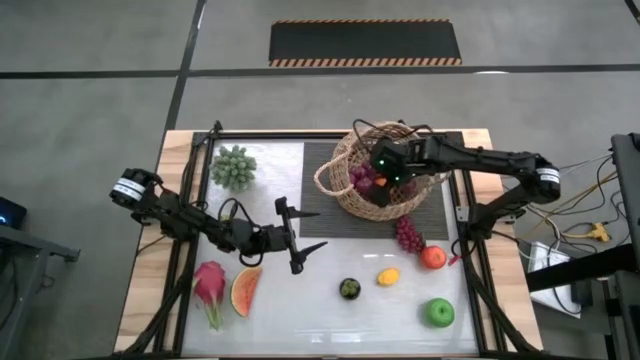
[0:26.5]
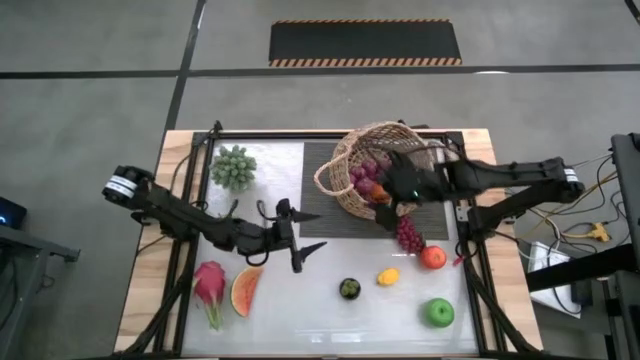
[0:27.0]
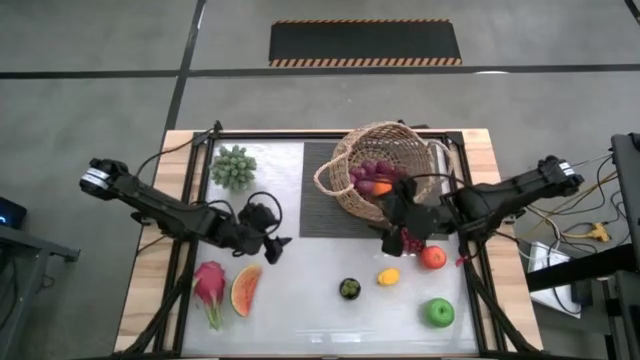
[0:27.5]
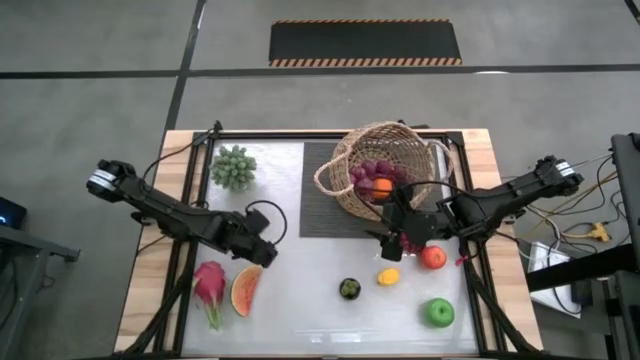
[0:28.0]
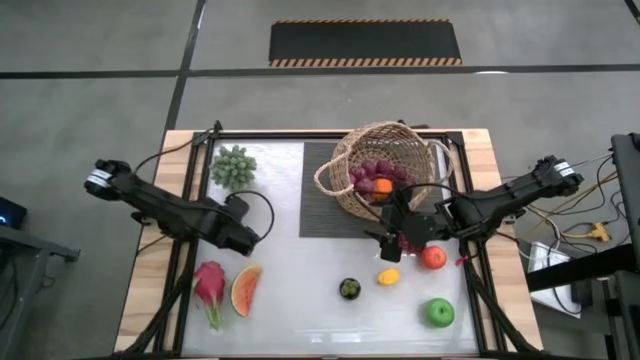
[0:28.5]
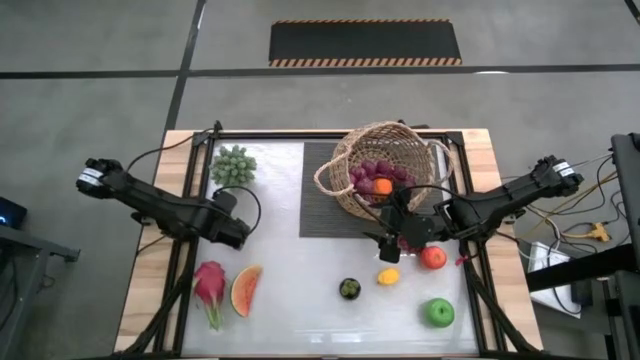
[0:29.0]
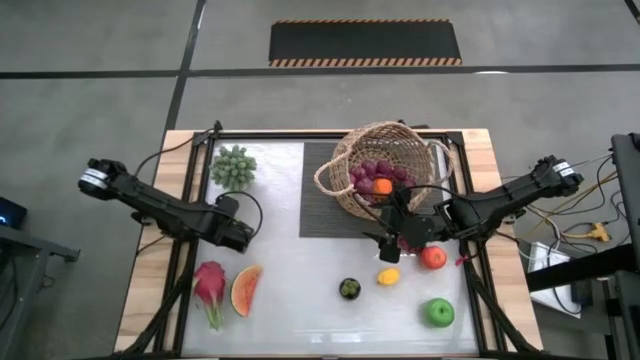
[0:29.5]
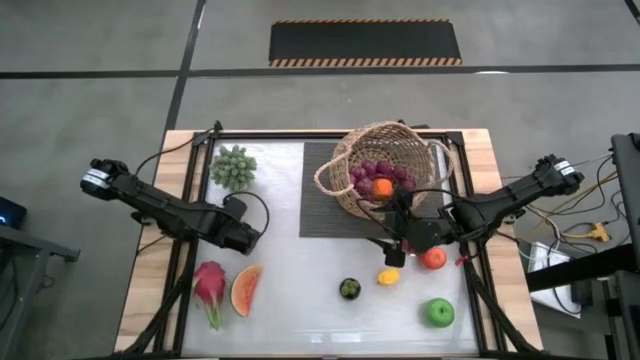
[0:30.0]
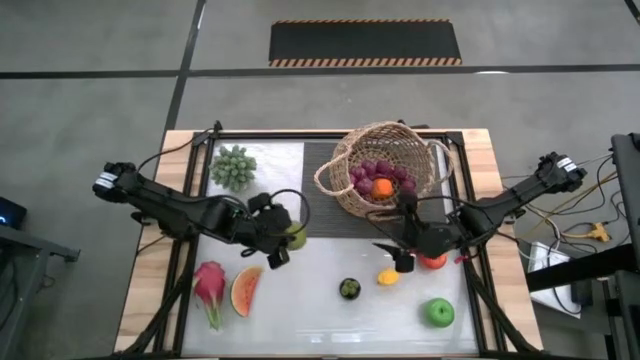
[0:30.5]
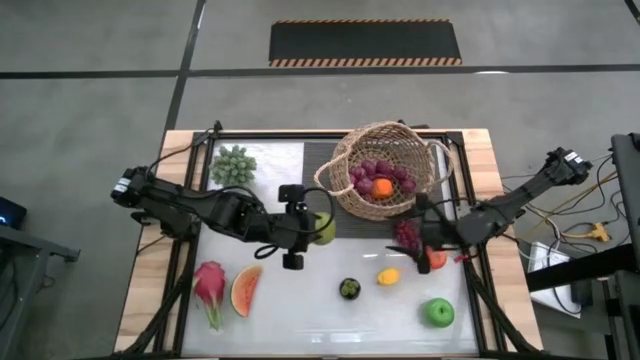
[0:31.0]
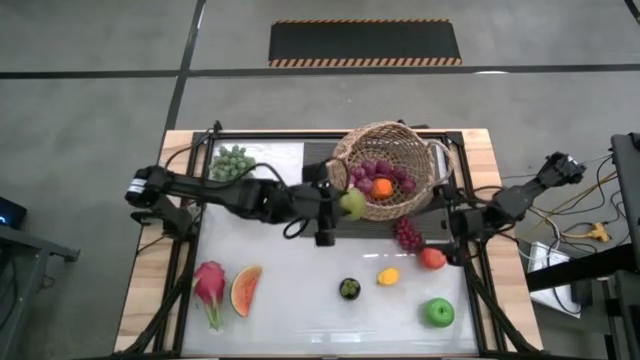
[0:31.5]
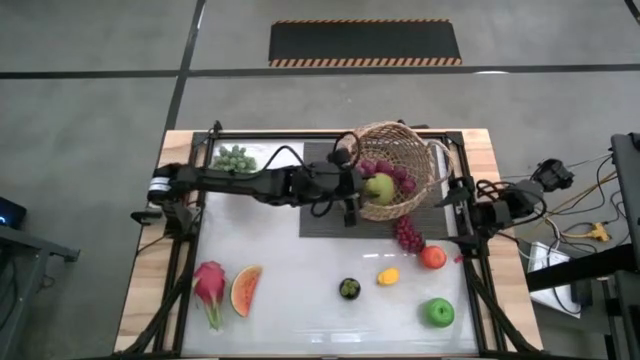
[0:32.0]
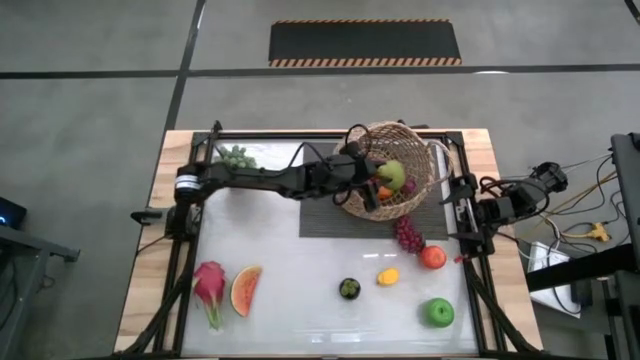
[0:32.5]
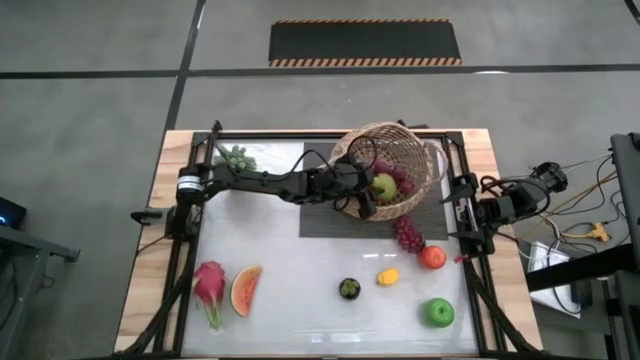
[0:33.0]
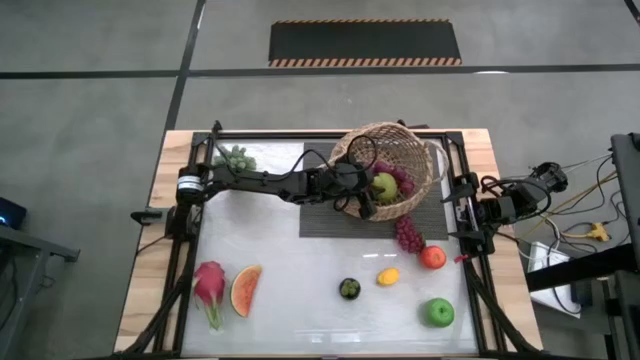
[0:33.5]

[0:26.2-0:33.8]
Task: Build produce basket
Put the pear into the brown basket

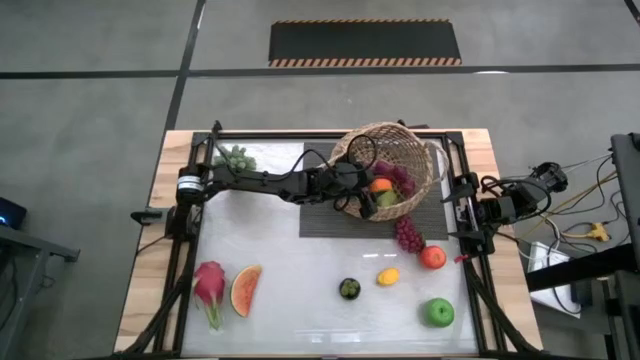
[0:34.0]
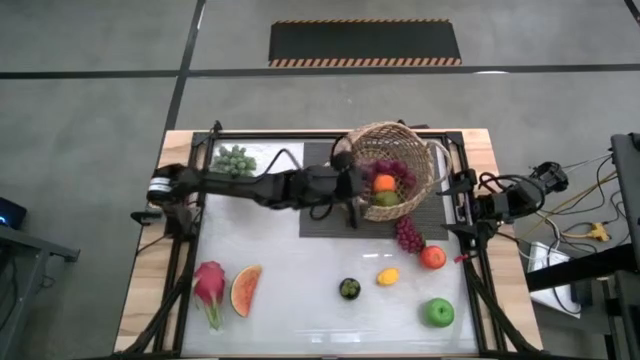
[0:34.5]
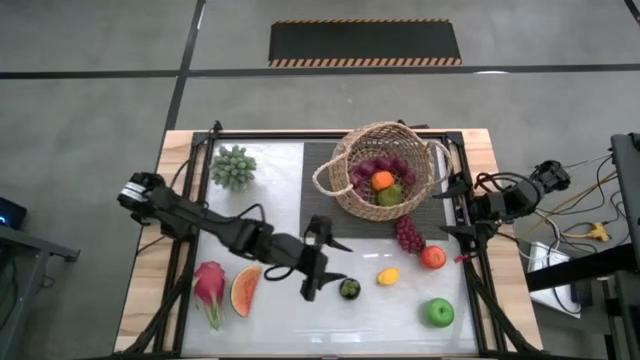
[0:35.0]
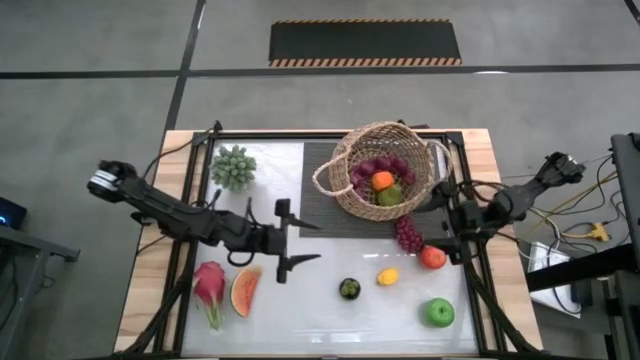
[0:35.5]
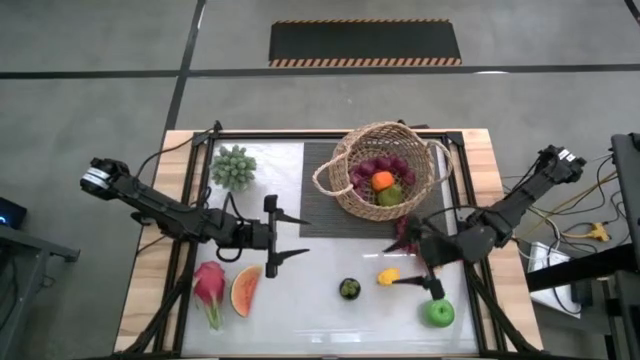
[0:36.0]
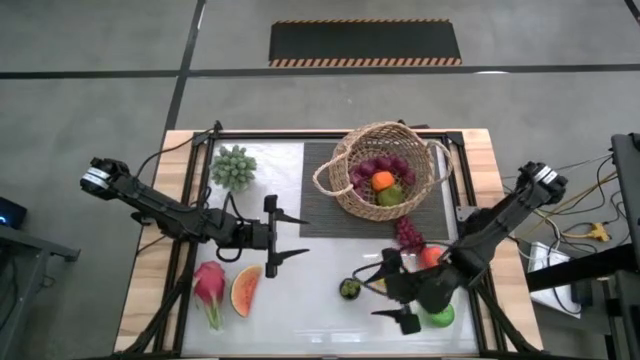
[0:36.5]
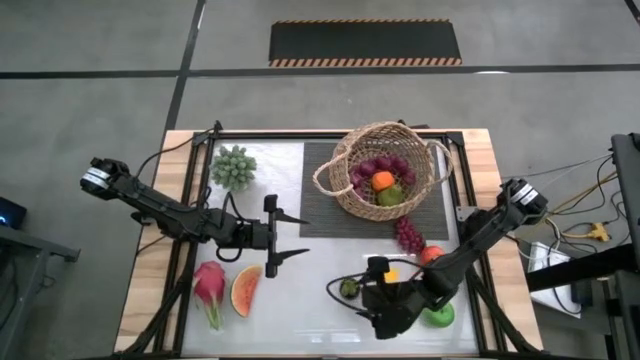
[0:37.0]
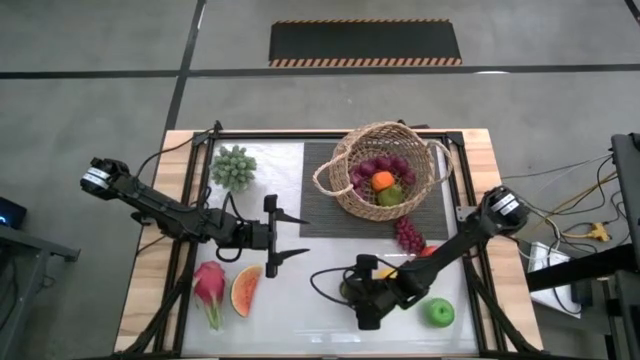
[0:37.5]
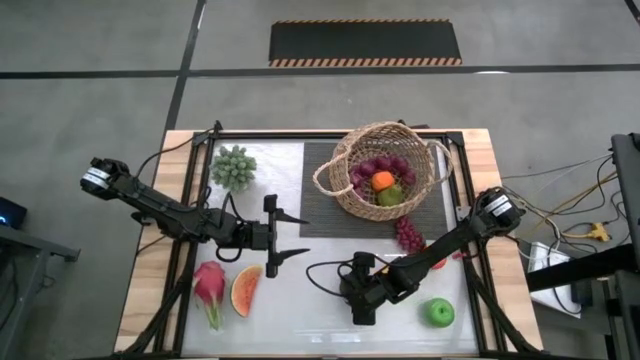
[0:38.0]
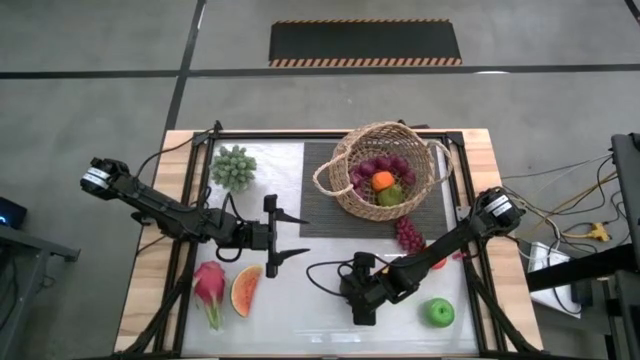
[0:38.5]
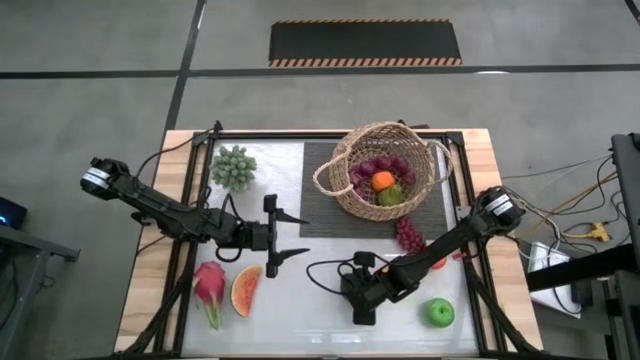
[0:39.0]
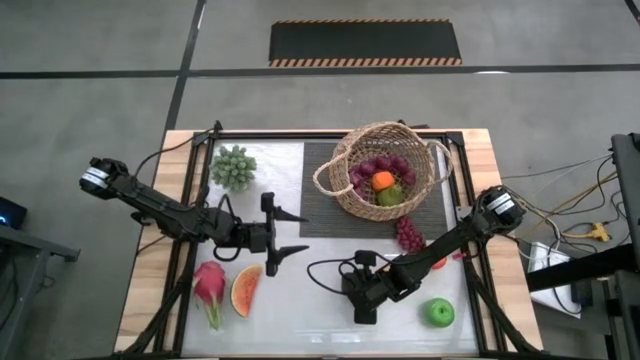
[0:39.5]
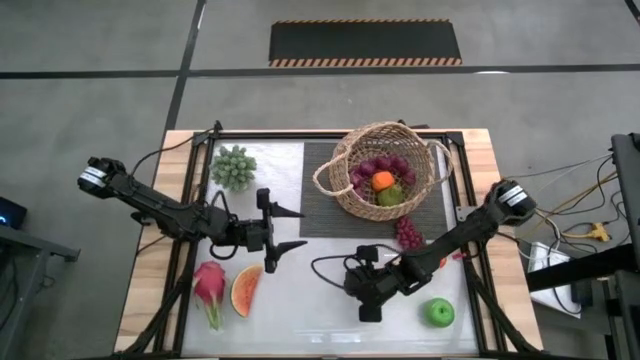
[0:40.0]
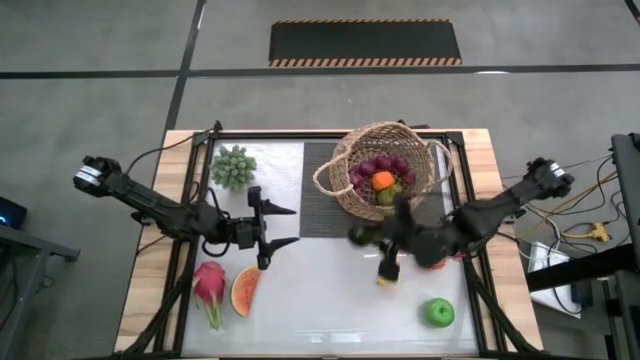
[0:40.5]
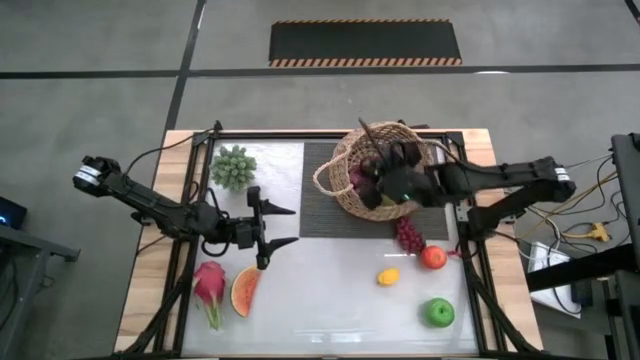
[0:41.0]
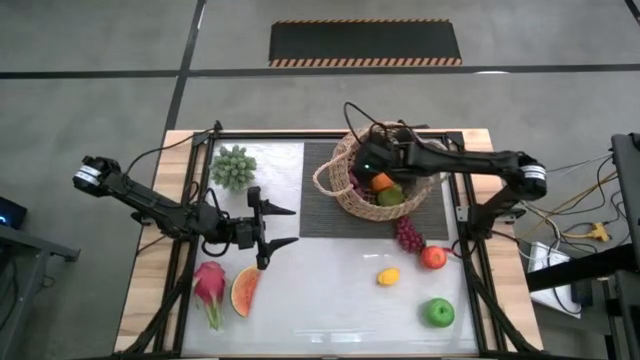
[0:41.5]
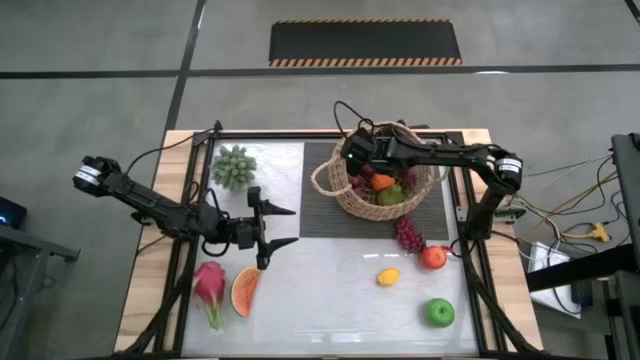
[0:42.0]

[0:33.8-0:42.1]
Put the mangosteen into the brown basket

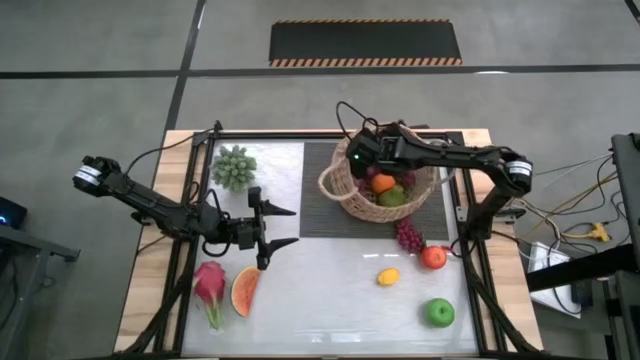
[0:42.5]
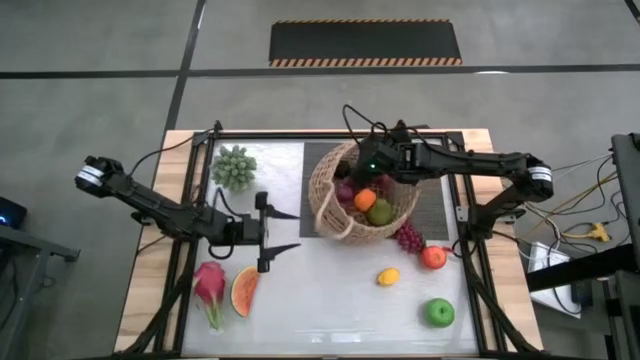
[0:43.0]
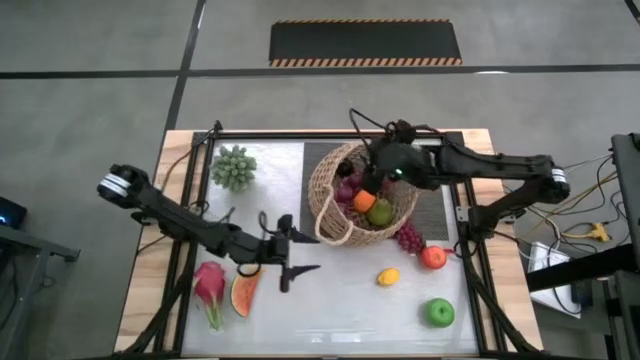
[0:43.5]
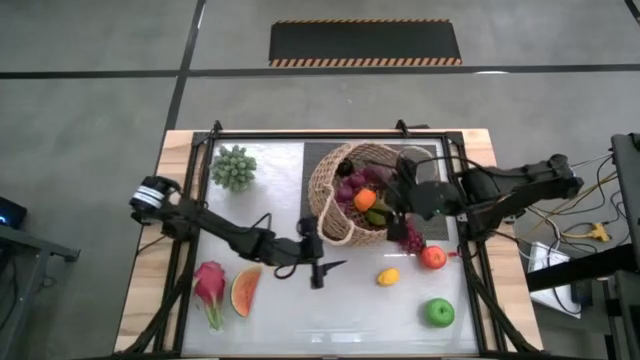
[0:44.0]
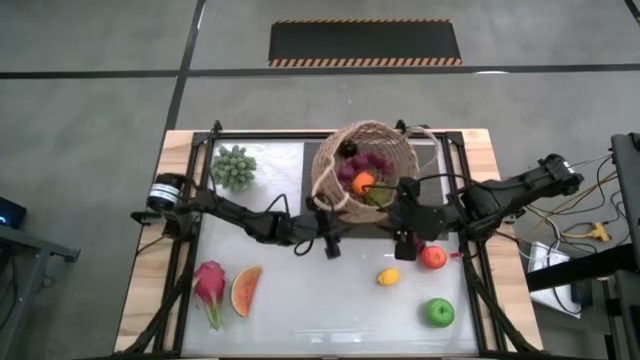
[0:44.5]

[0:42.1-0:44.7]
Adjust the basket on the table
